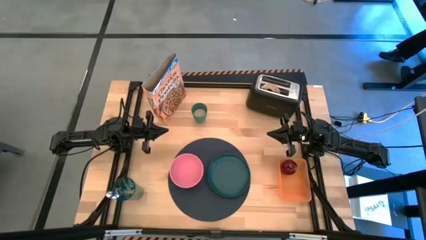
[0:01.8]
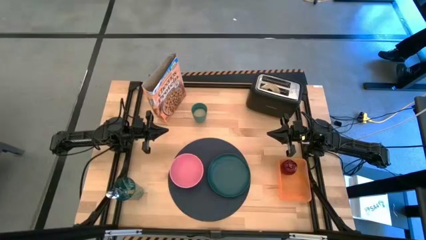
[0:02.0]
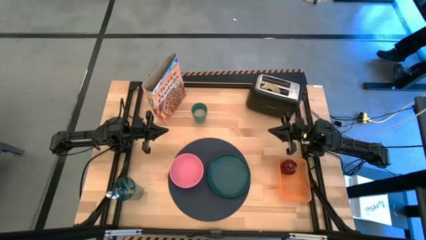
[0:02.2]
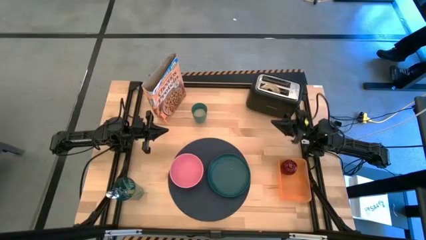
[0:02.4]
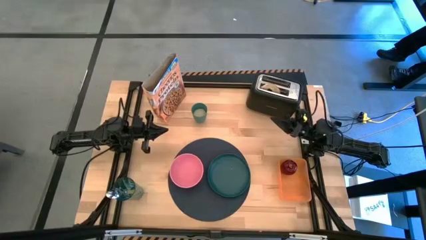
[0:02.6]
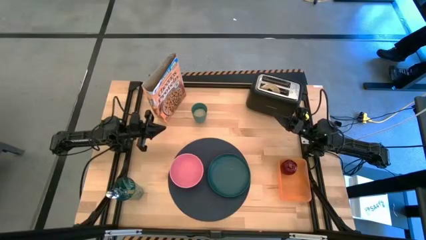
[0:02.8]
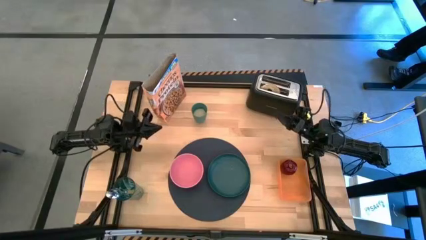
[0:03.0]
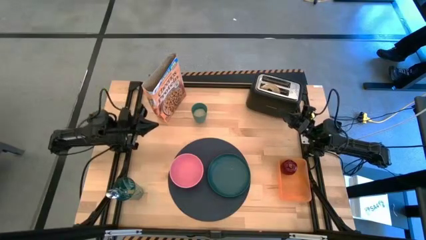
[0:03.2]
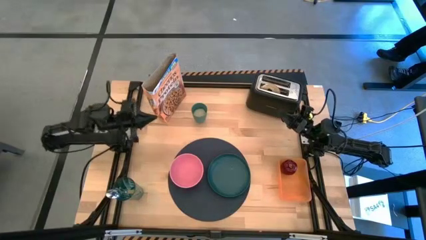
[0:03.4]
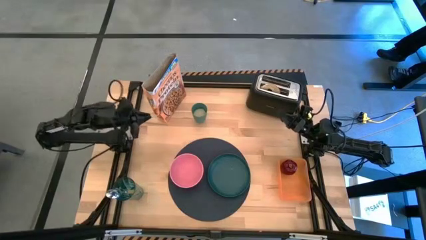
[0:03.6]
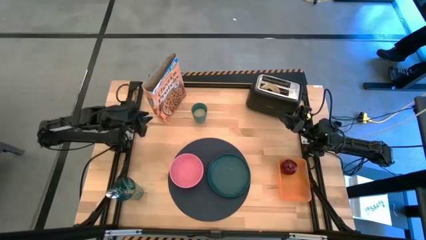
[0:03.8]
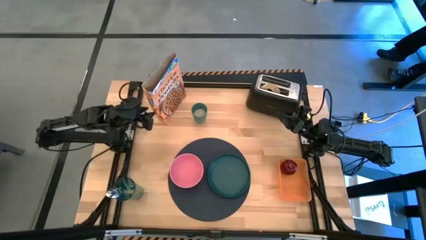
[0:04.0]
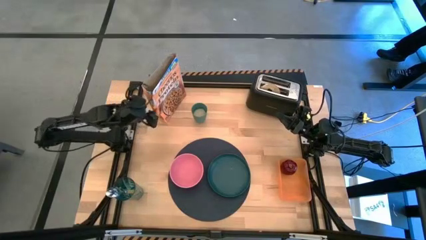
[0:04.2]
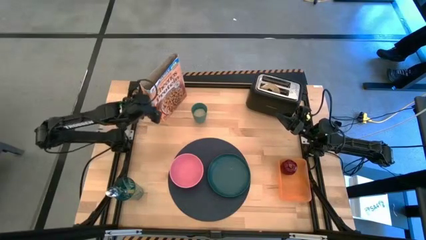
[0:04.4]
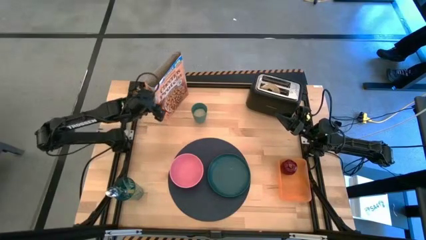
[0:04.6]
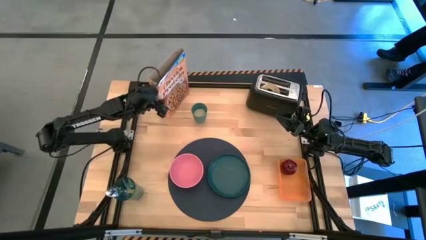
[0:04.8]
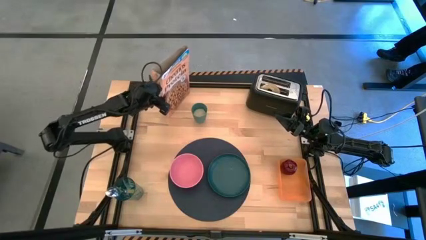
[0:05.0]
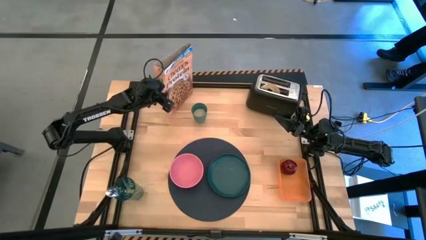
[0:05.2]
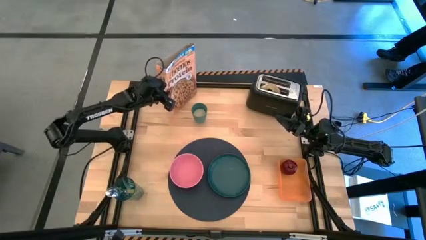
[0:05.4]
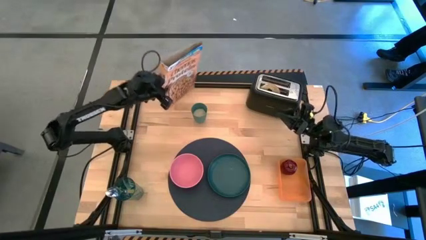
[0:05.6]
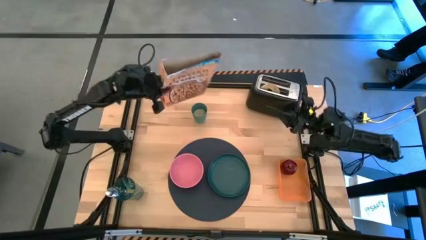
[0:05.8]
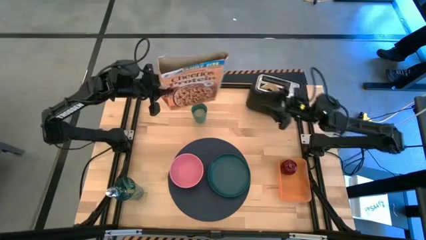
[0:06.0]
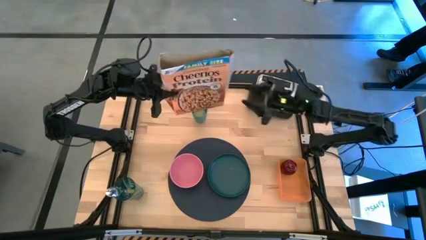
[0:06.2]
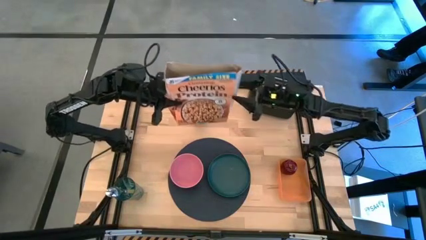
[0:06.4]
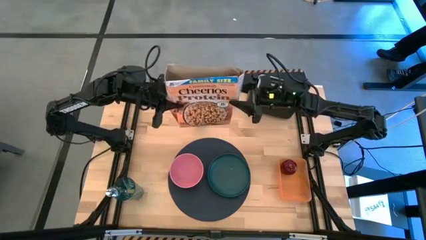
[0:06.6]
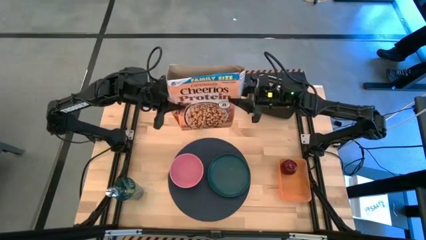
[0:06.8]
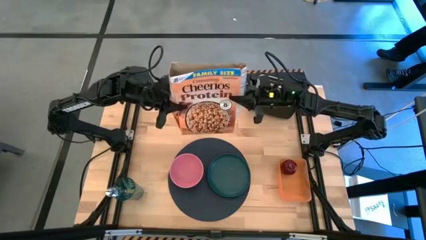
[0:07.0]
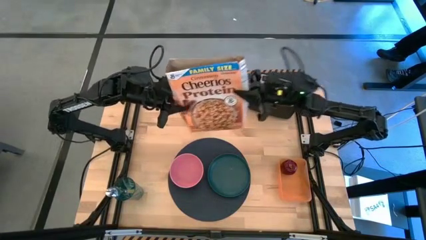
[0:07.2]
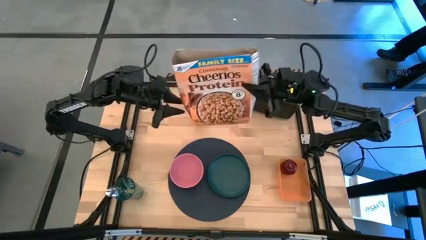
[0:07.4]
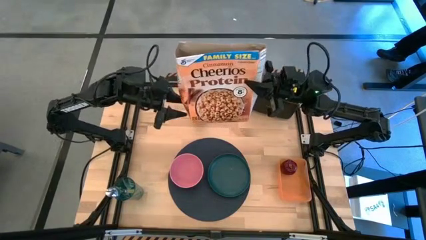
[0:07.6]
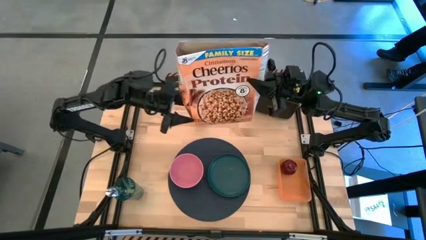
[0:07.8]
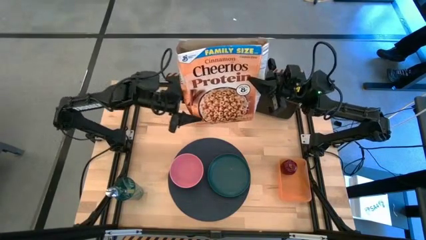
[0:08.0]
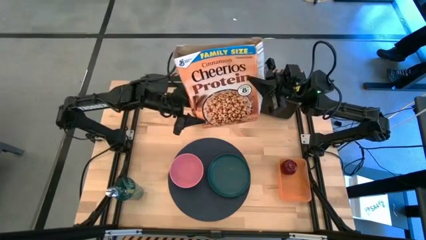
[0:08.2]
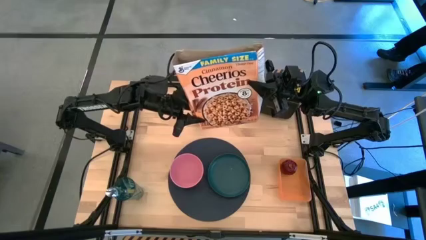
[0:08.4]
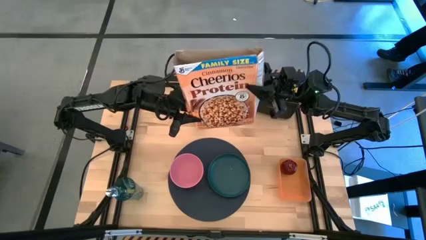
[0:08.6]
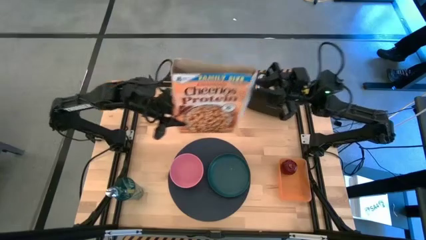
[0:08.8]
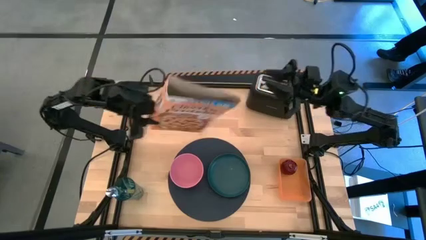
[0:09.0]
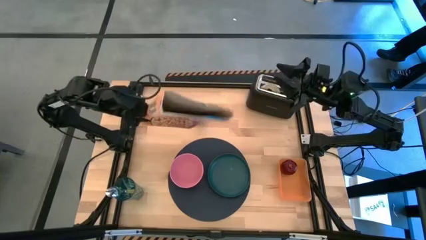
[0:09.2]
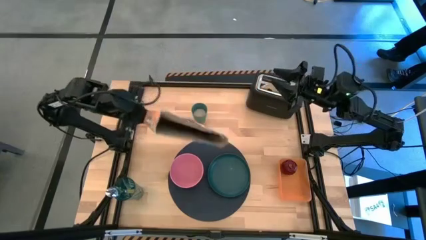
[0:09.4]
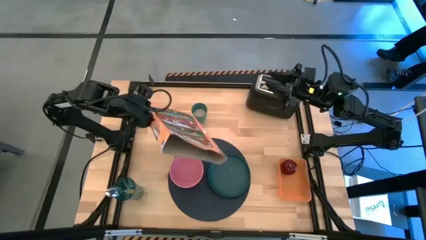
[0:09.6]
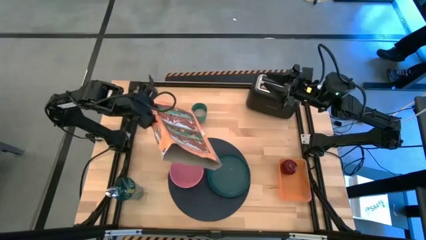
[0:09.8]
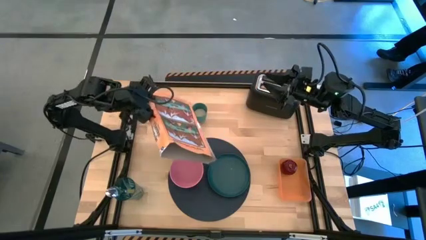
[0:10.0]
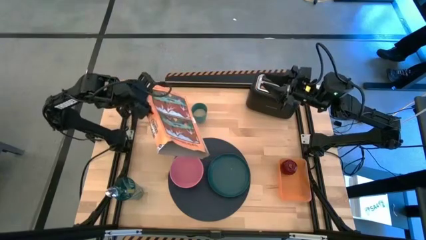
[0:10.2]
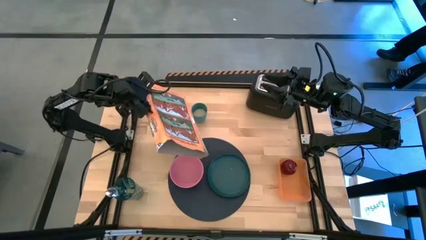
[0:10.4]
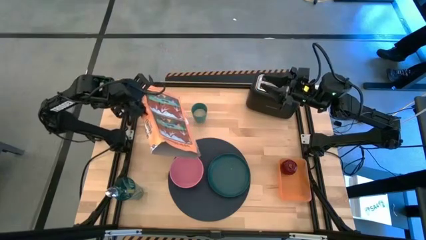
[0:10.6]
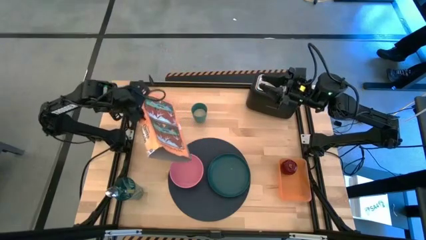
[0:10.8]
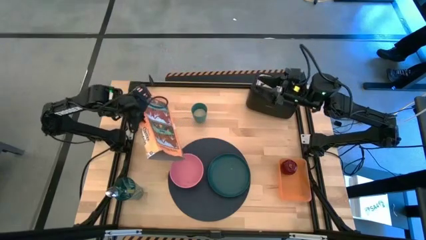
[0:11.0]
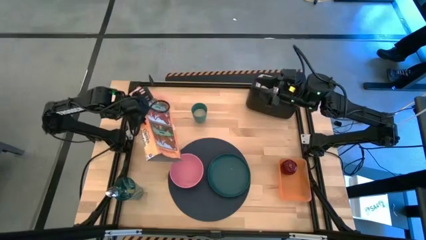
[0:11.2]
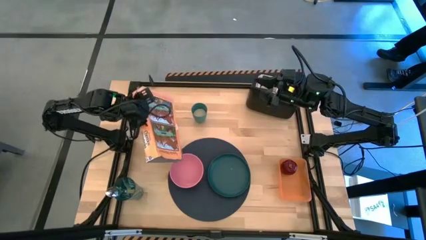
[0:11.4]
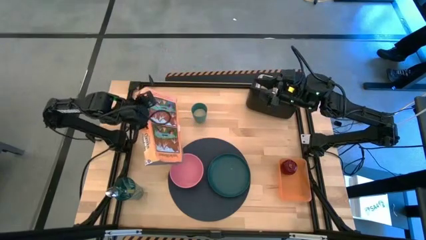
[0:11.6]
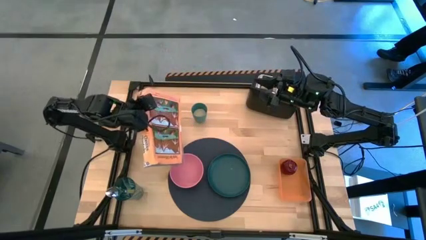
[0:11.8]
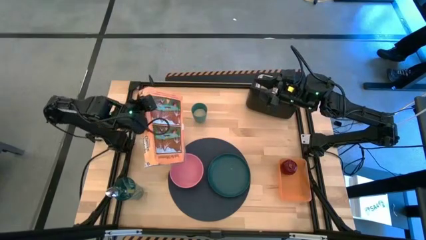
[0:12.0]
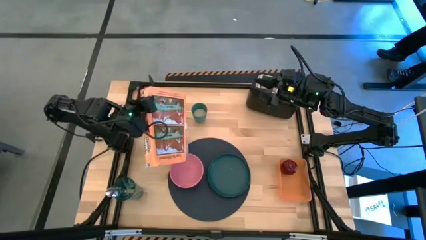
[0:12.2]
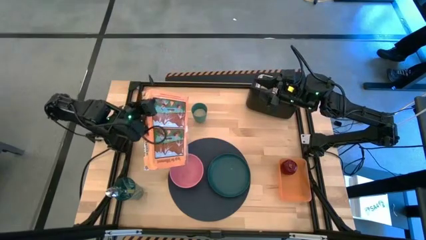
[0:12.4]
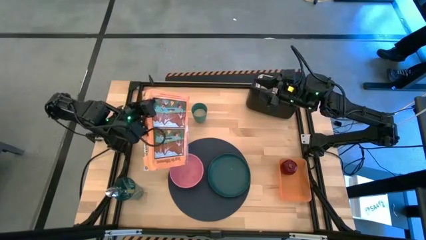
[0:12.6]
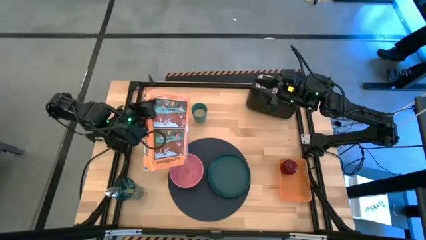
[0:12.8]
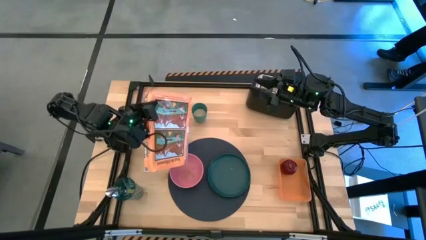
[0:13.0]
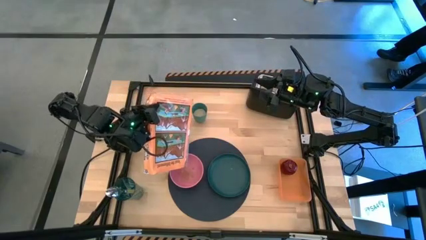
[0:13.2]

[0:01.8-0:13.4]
Task: Arrange a breakfast setting
Pour the cereal from the cereal box into the pink bowl
